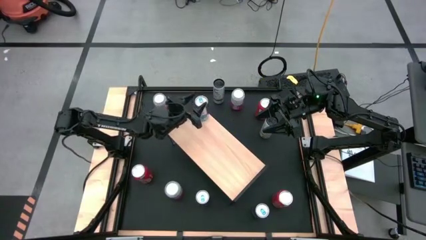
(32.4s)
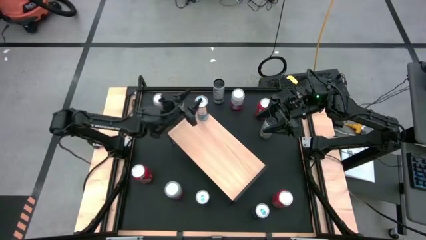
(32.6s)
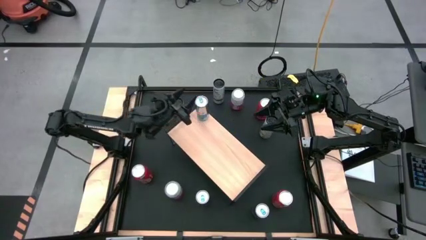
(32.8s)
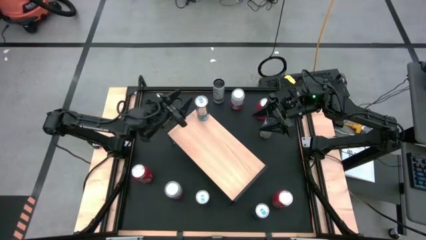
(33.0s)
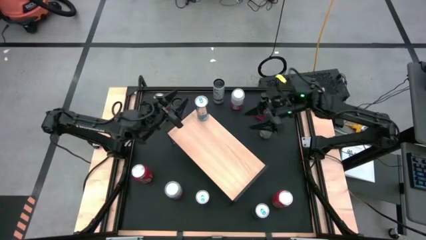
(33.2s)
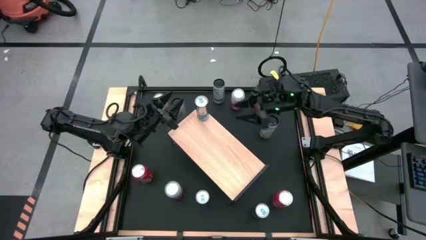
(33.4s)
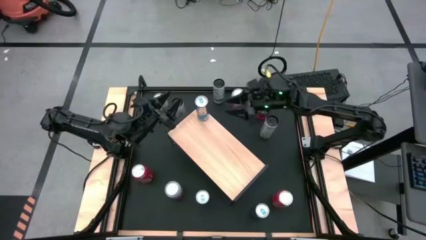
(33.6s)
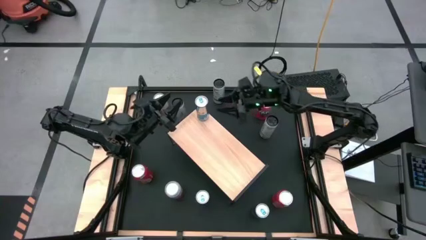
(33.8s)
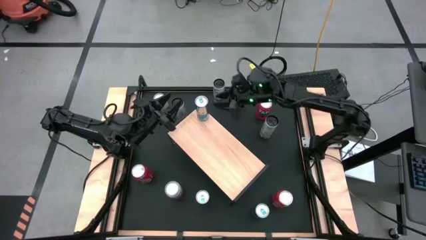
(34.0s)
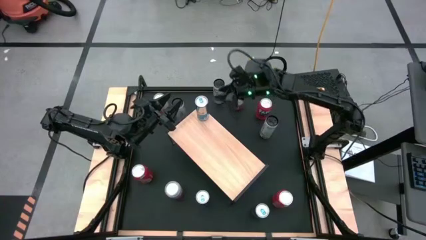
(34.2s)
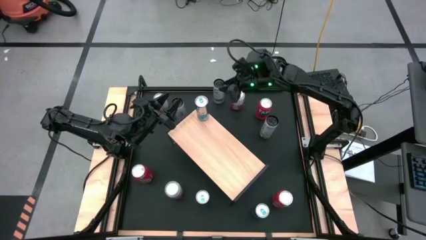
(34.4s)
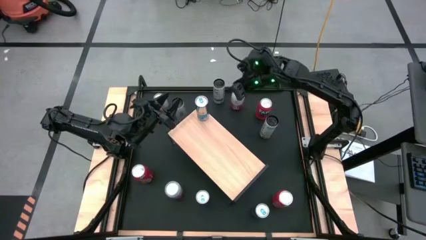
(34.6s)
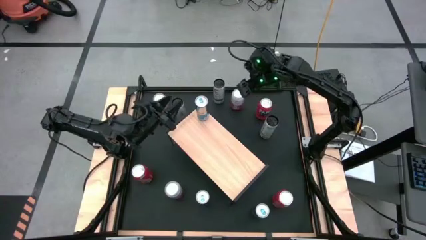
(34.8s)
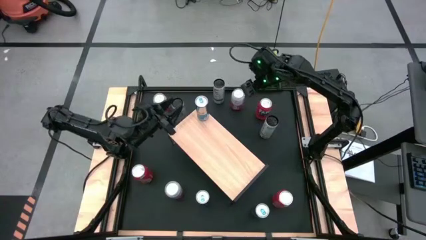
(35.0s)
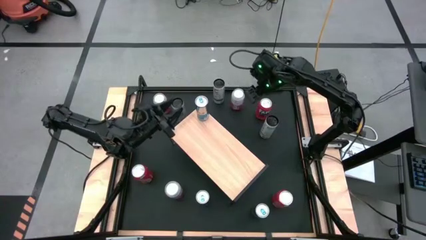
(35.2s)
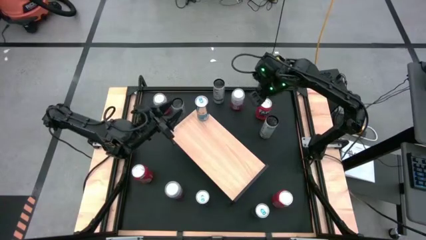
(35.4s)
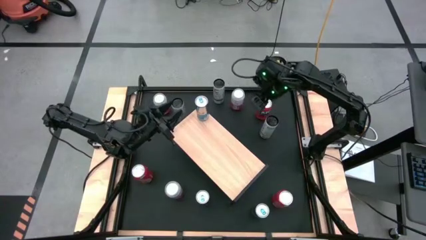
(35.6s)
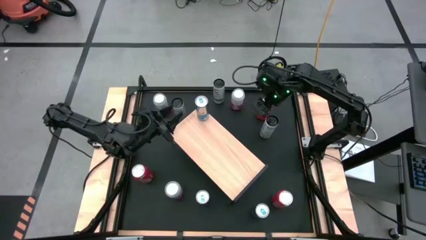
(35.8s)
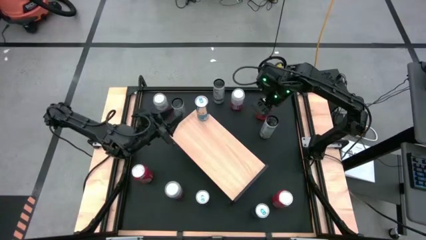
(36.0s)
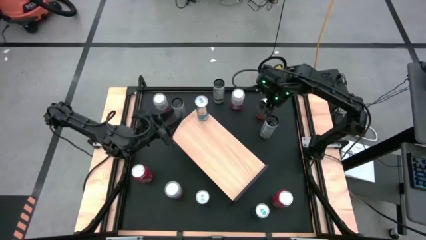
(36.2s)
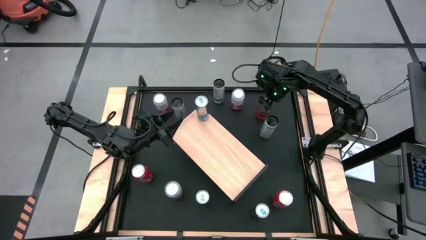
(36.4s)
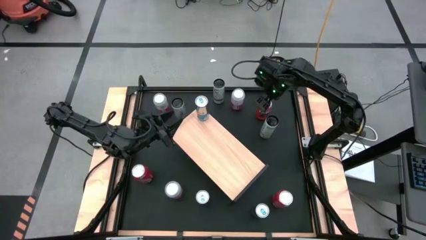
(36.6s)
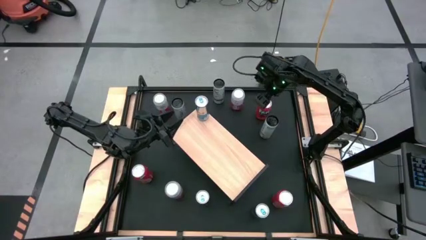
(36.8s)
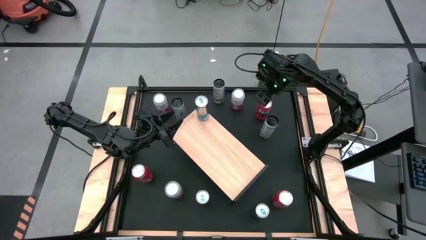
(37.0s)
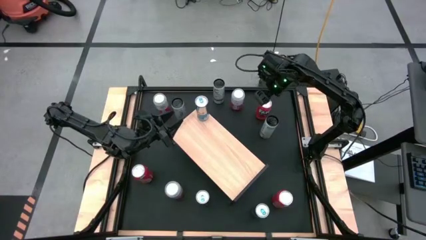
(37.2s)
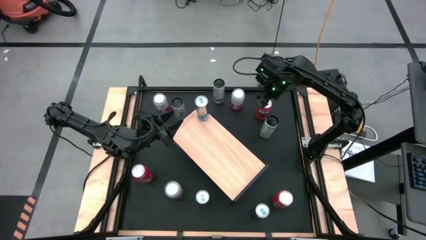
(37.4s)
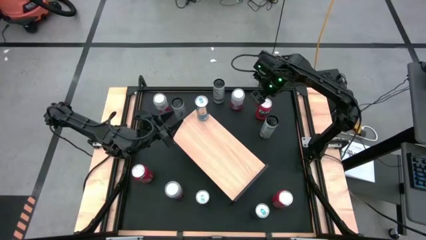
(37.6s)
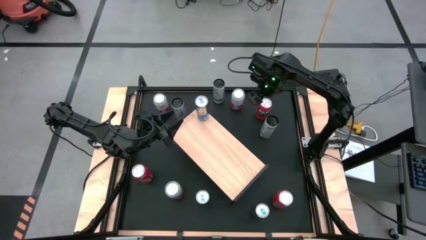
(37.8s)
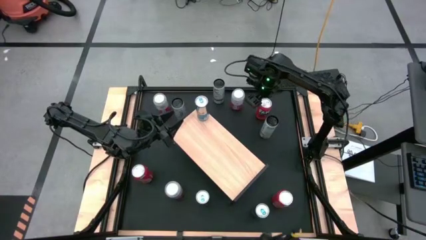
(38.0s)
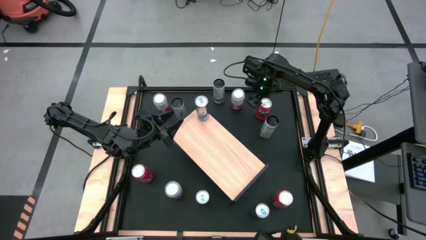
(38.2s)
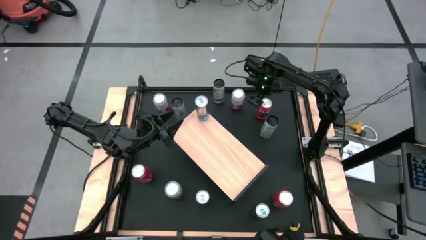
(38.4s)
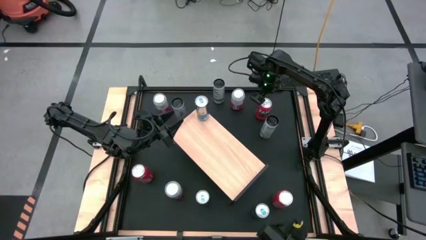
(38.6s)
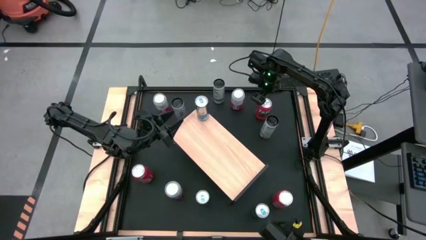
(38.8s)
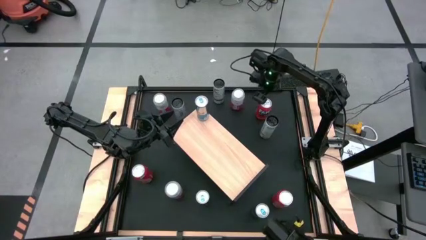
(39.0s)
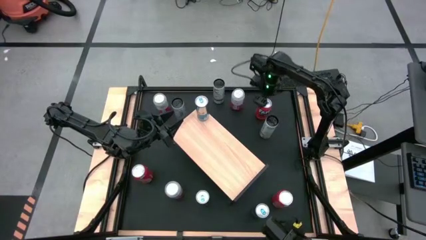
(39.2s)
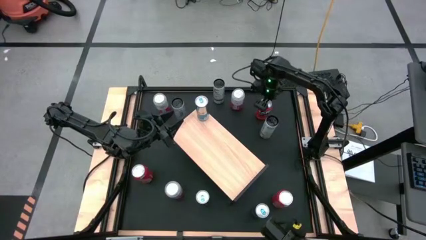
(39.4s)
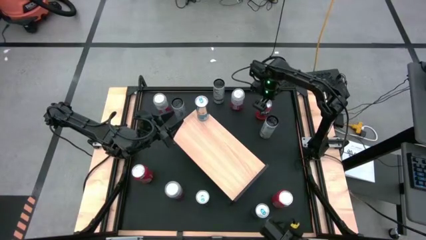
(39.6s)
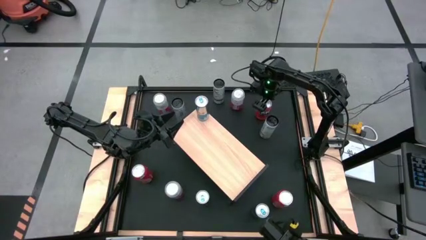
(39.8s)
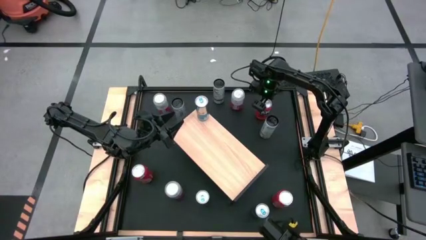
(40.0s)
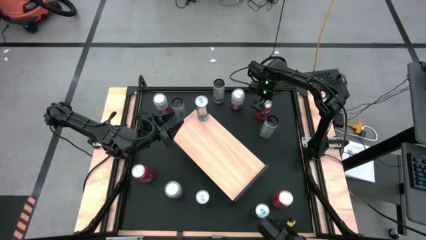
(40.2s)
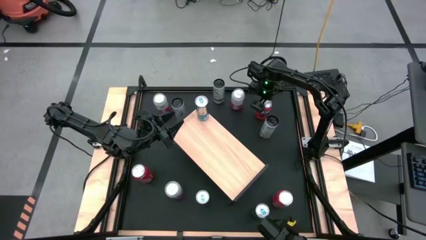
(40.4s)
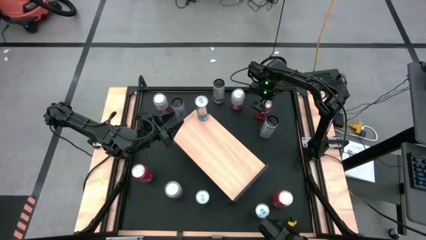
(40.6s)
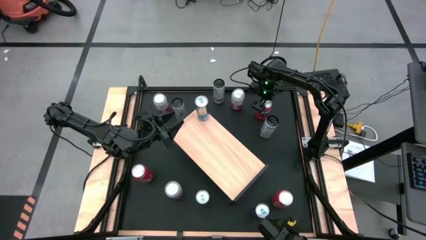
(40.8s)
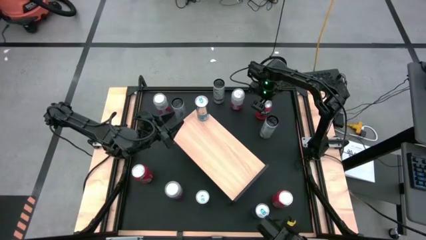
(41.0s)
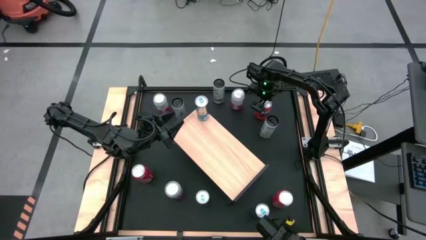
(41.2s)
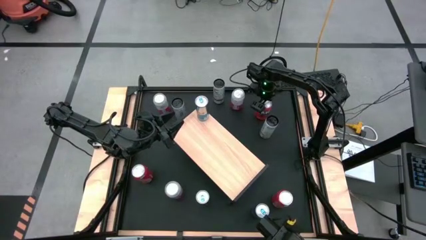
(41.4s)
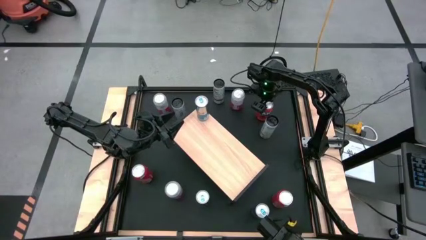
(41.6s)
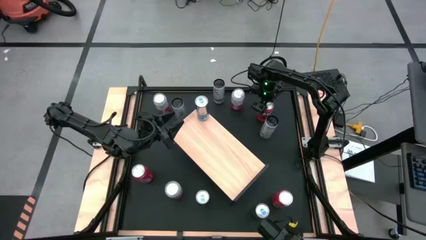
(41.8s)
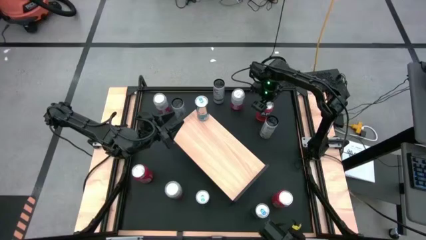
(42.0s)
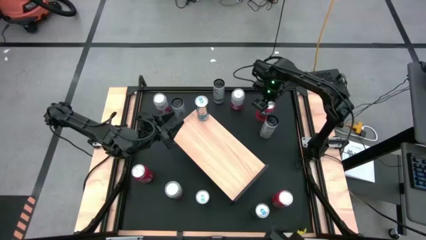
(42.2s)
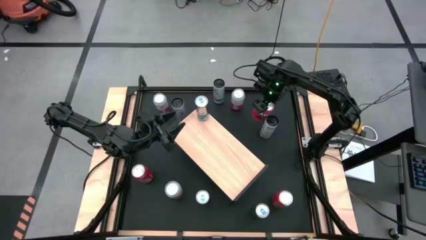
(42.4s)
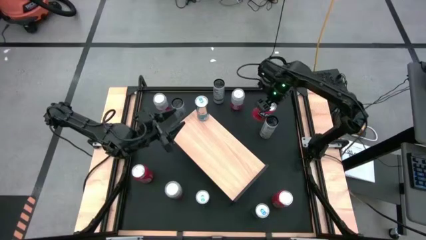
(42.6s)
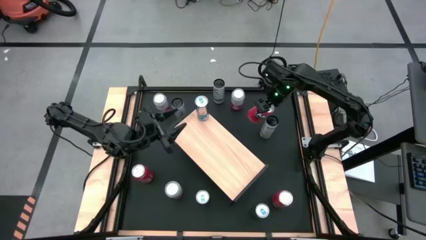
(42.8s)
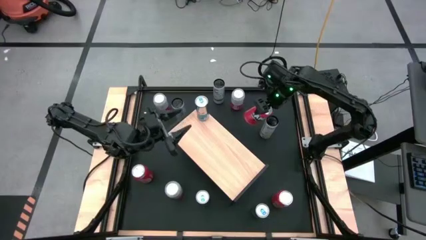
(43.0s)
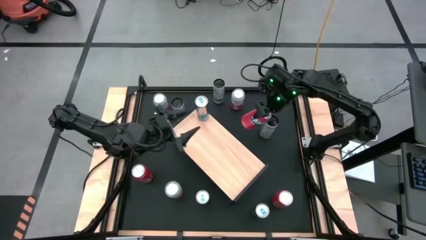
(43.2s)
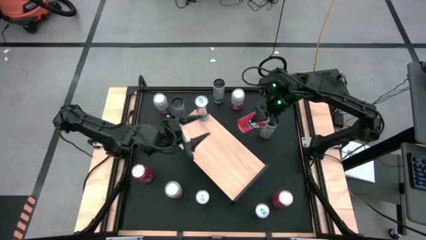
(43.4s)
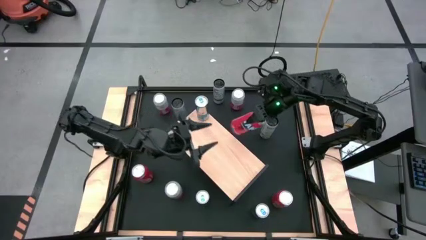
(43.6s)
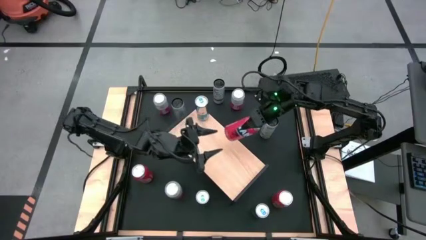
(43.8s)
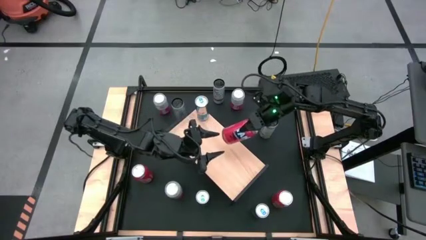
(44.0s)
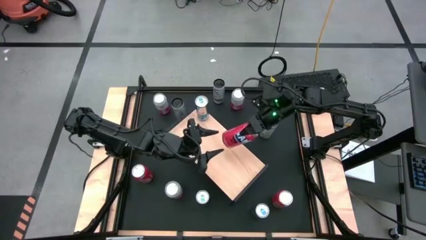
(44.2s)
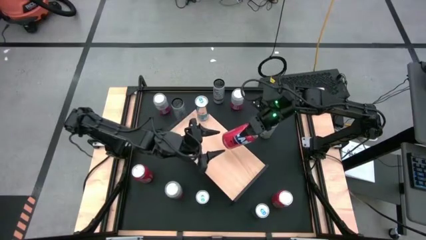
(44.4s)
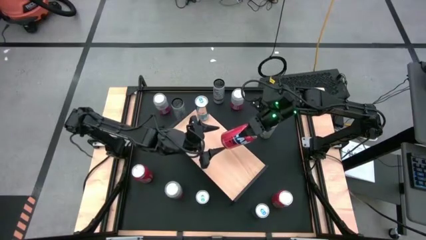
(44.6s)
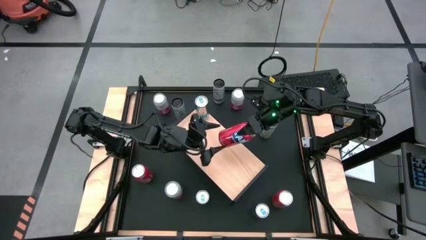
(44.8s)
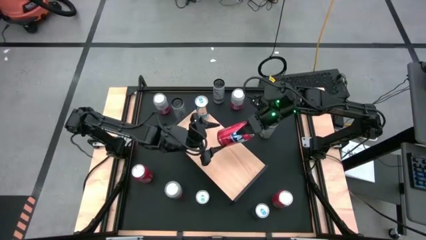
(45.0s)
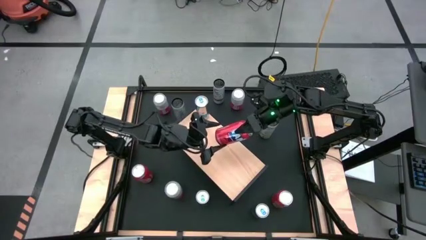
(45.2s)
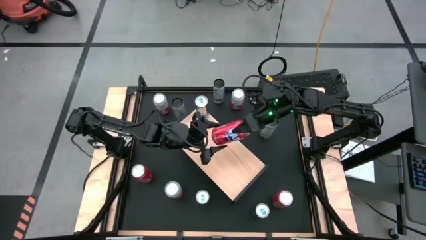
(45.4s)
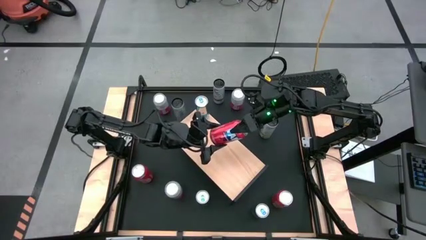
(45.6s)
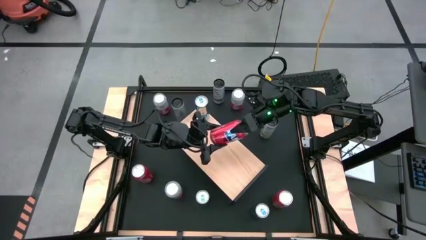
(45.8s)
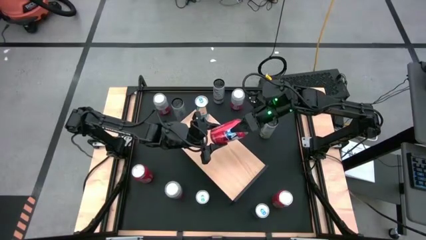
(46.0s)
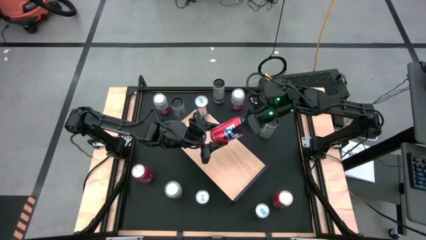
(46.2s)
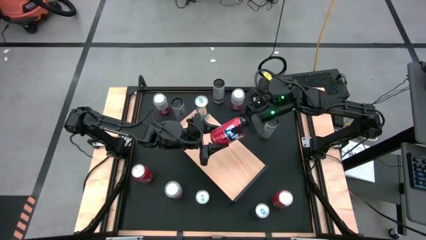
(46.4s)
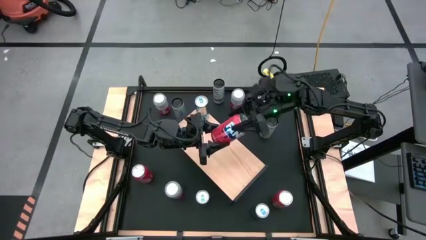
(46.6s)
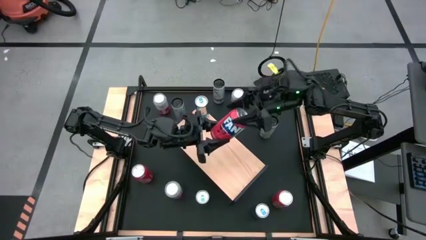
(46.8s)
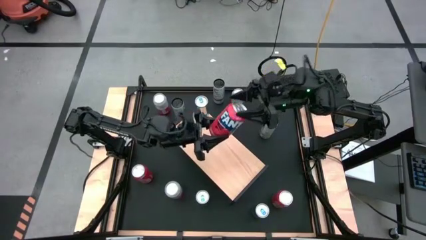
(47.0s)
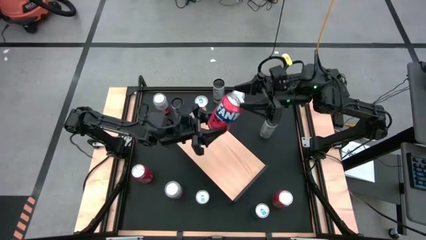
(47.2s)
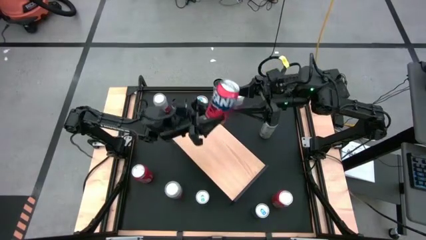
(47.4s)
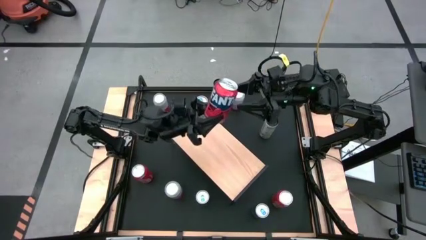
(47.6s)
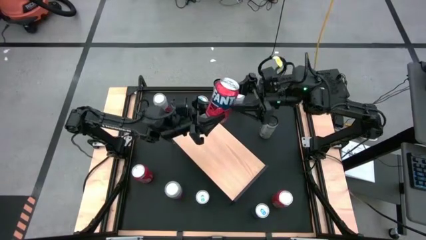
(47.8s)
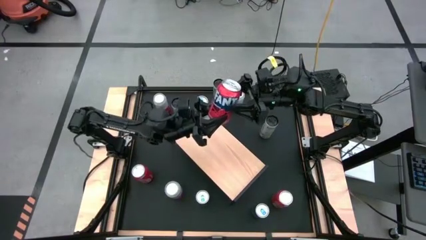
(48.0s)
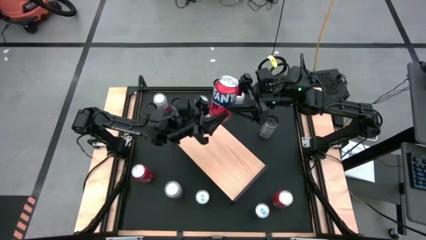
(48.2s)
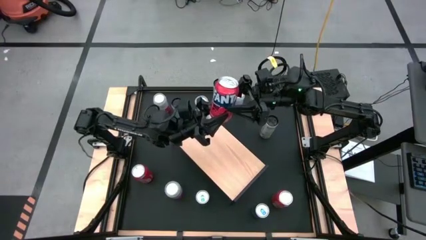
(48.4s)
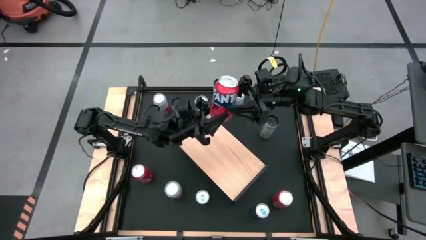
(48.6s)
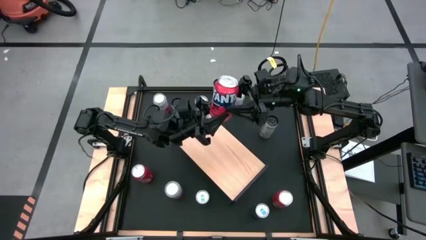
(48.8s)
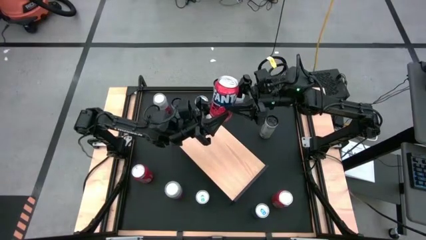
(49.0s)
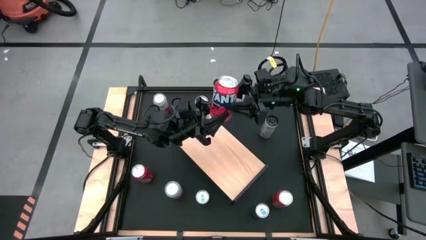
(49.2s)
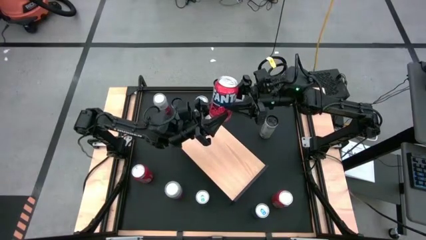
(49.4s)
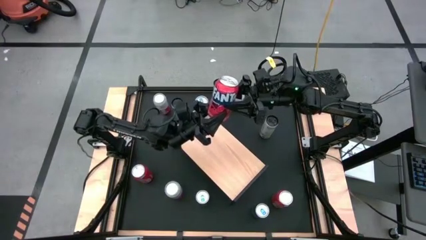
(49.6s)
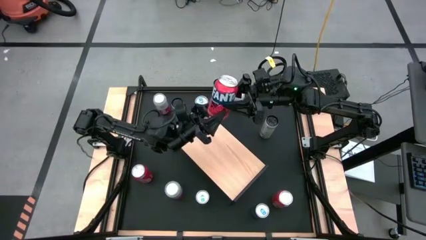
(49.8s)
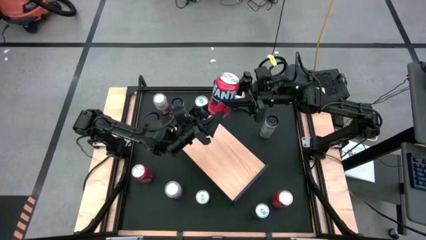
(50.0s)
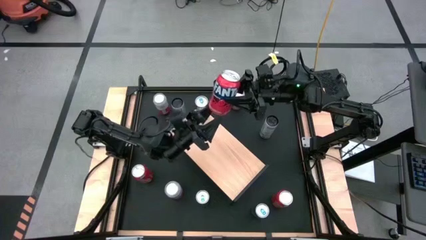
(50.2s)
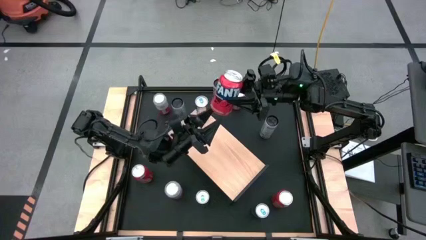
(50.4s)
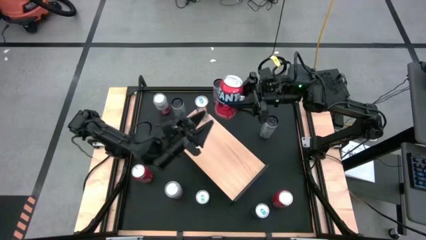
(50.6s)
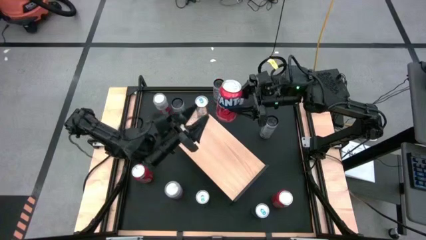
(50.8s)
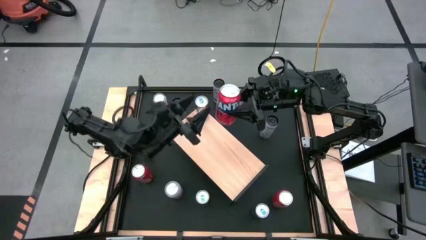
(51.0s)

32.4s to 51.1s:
Task: Place canned beverage on shelf
Put the top red soda can on the shelf
